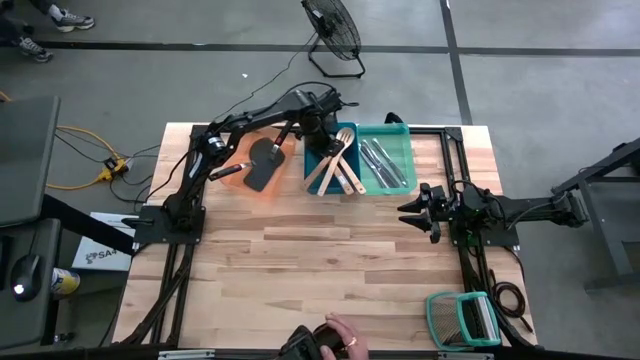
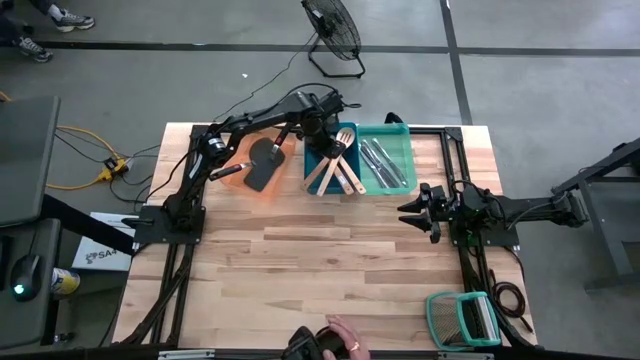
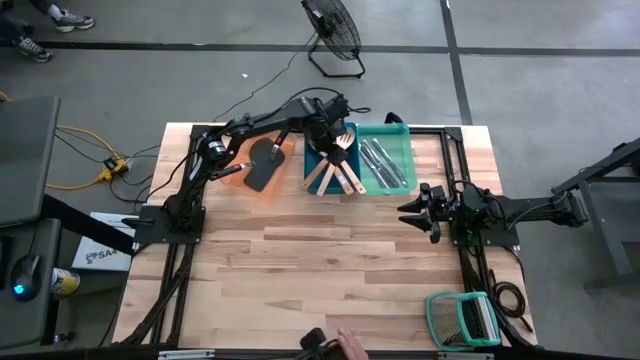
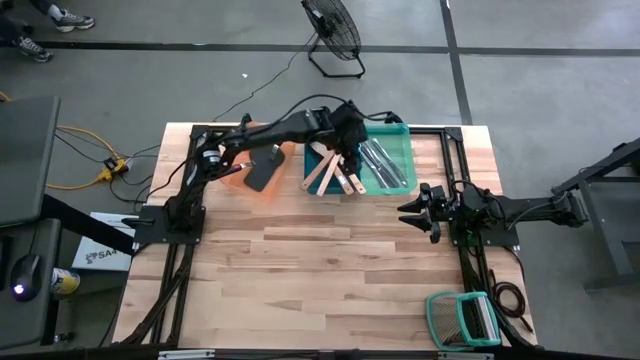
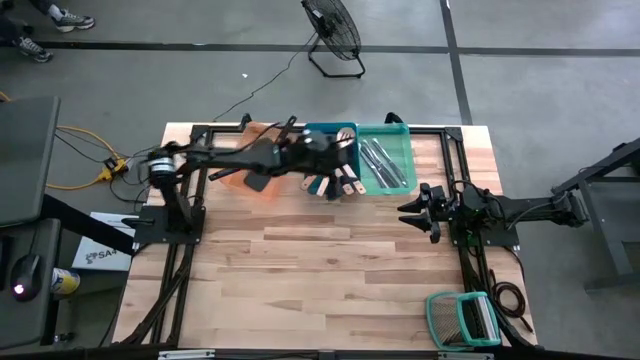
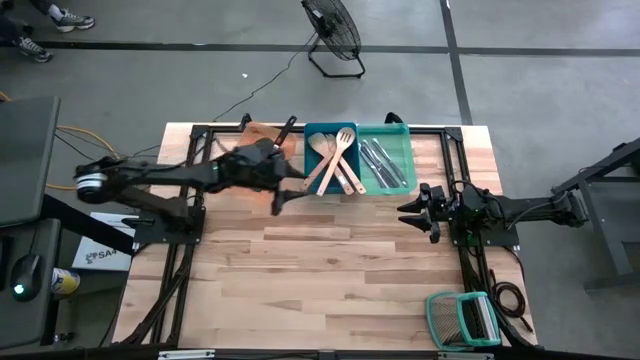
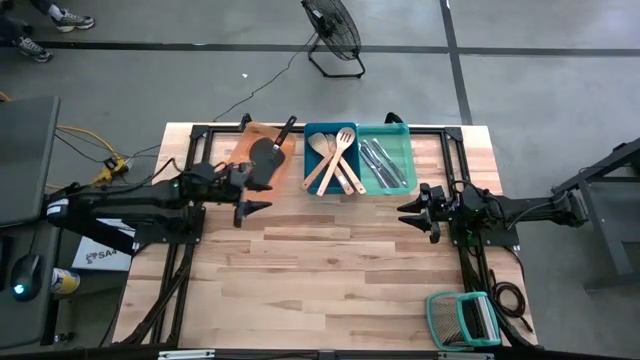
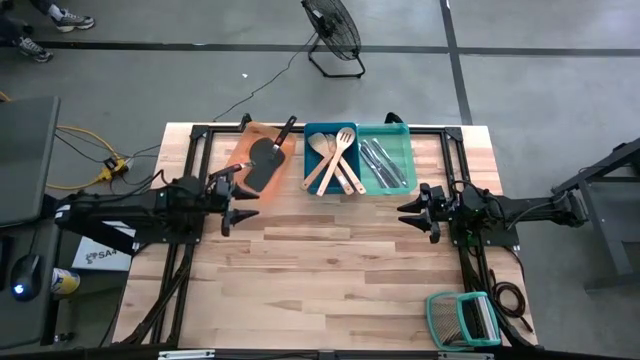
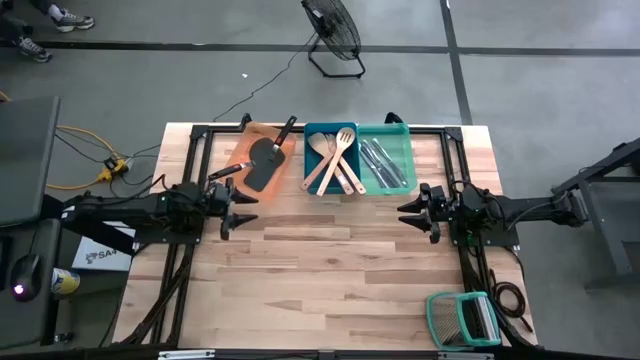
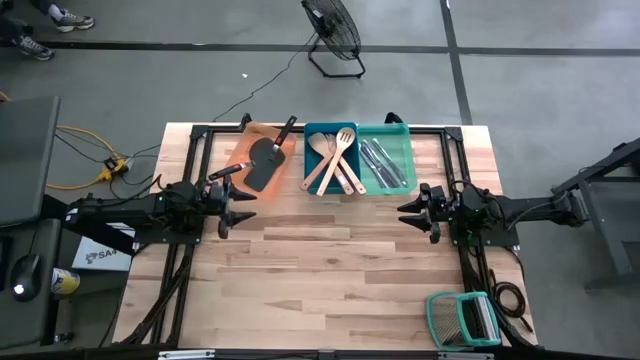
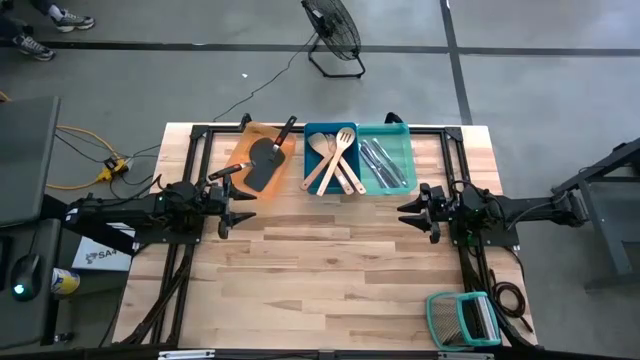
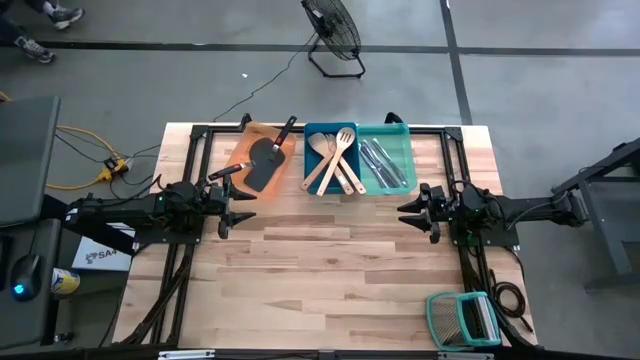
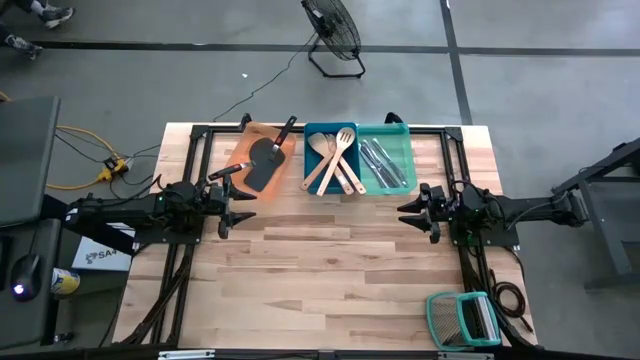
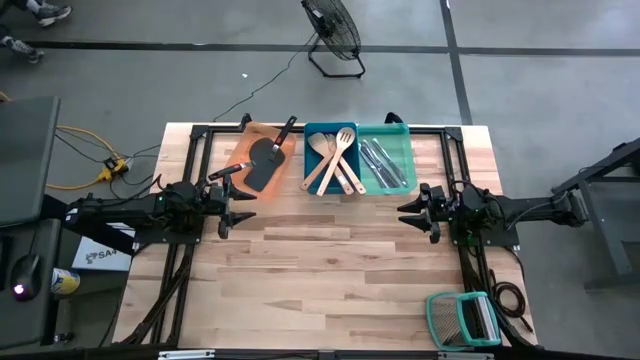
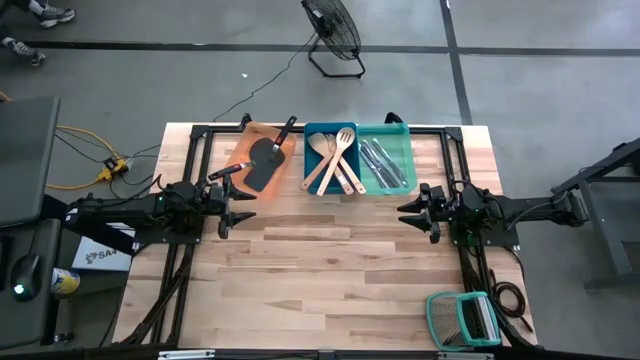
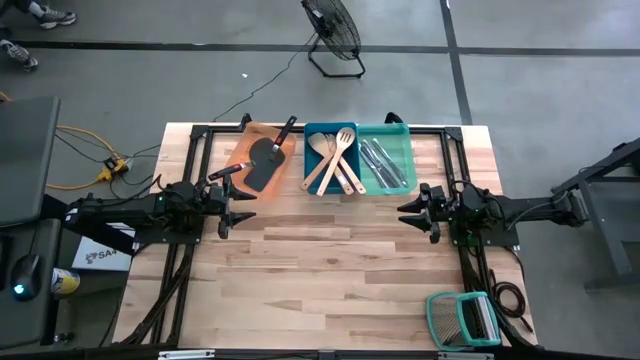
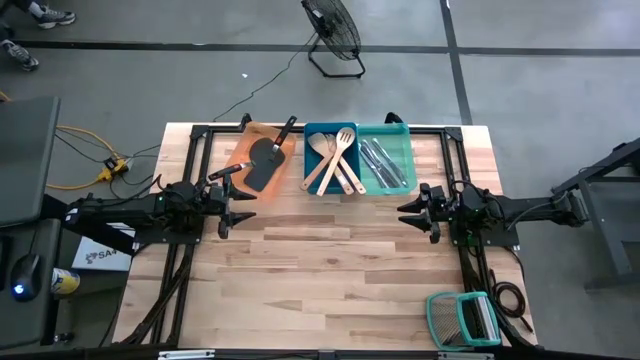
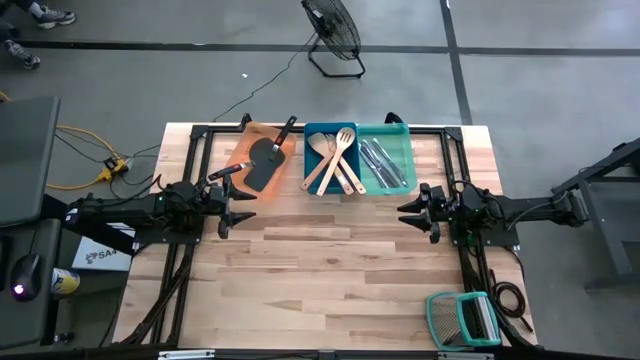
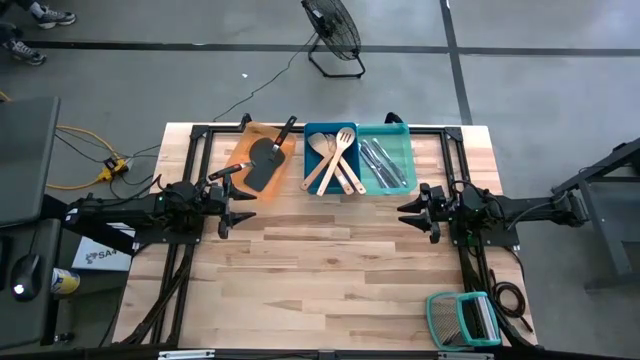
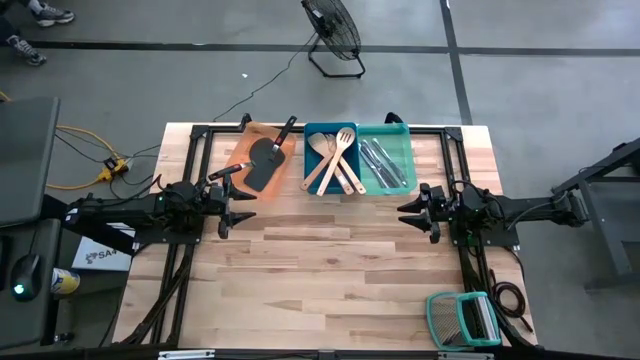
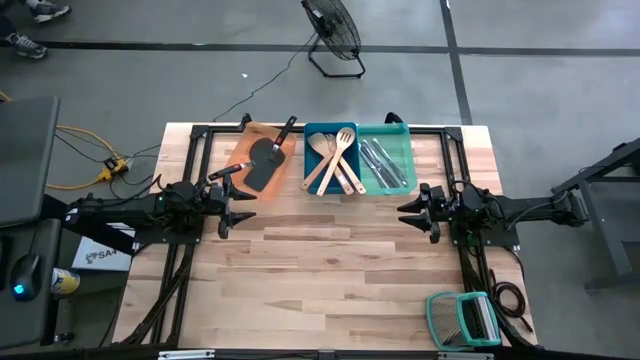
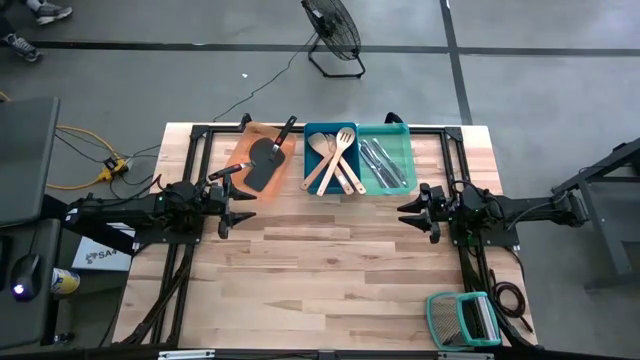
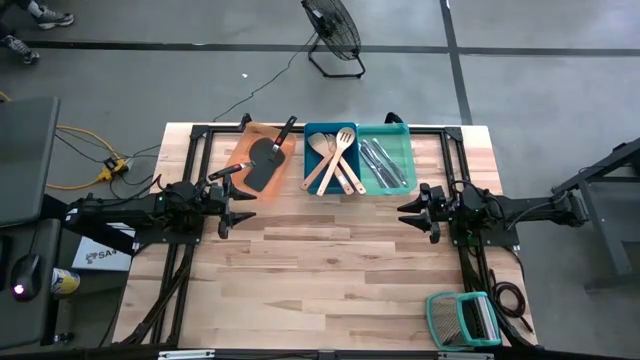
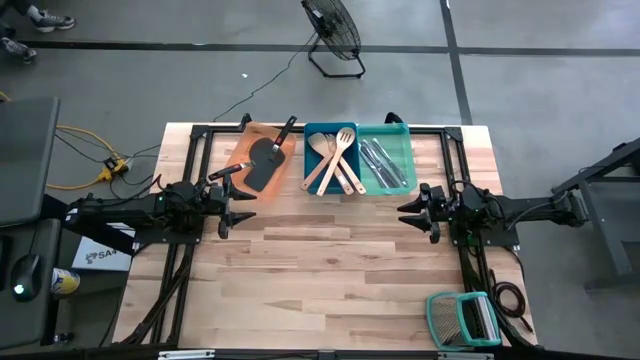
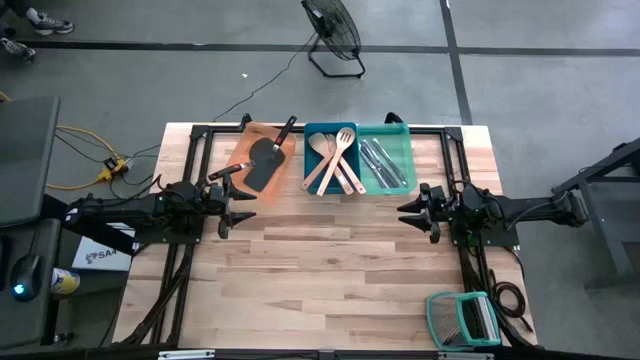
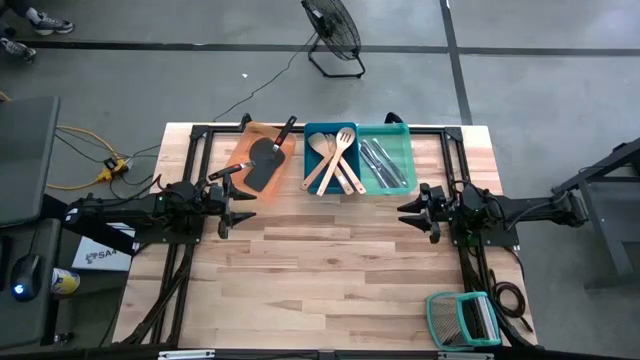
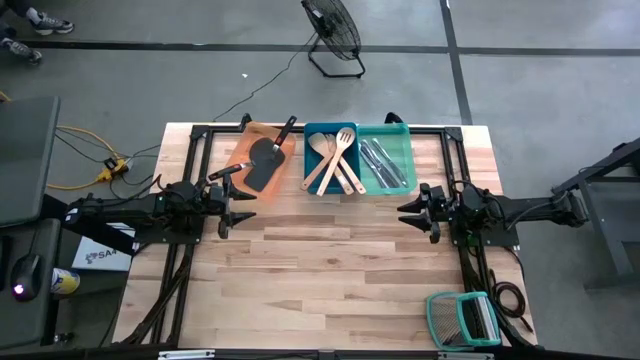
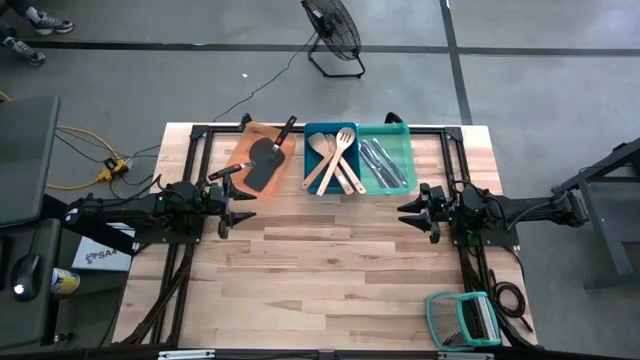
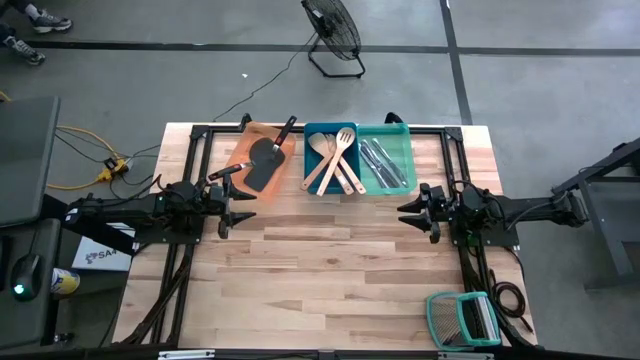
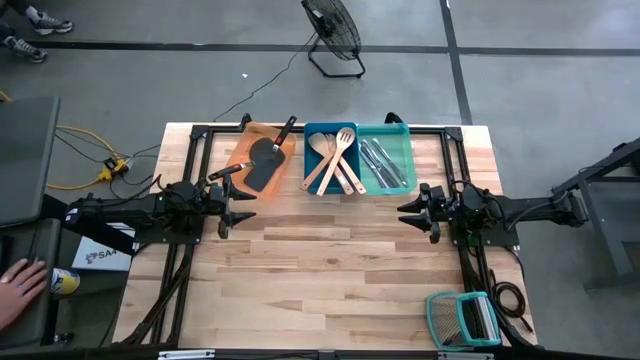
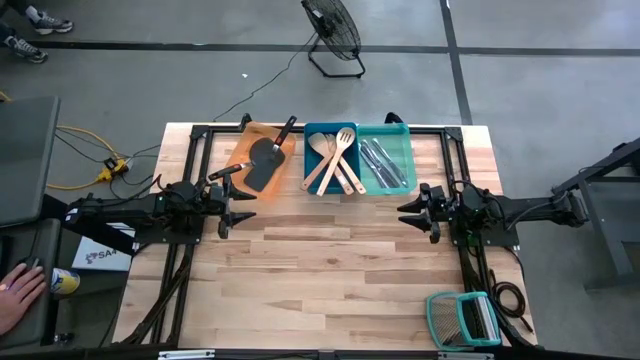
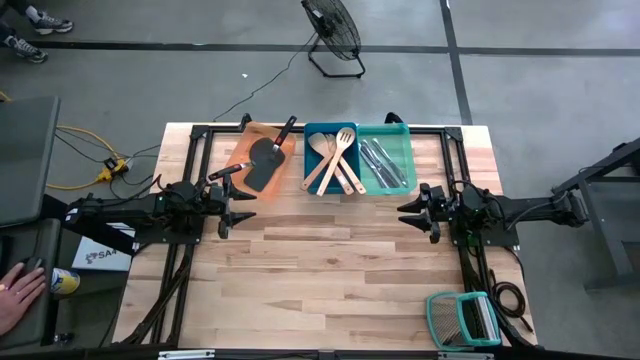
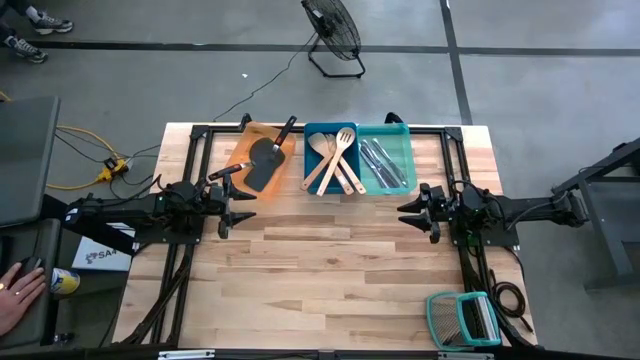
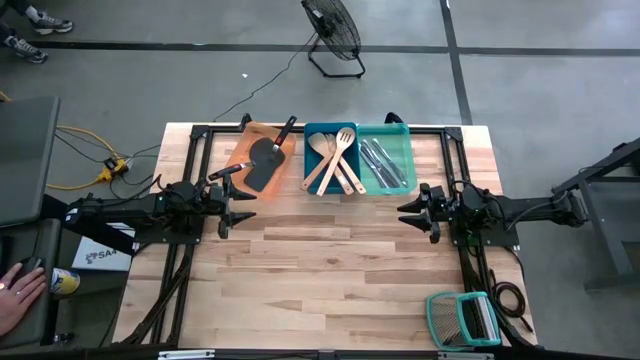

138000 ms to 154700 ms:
Task: Pick & Place Kitchen Items
Return to Home Position

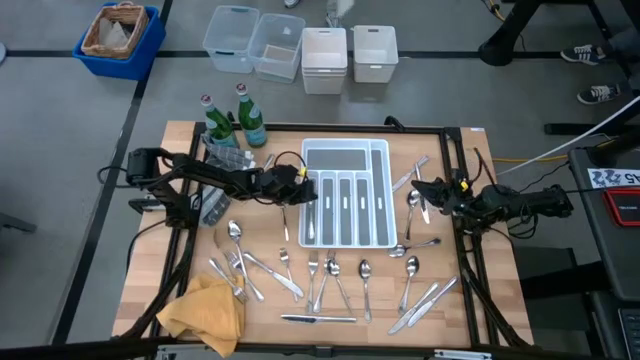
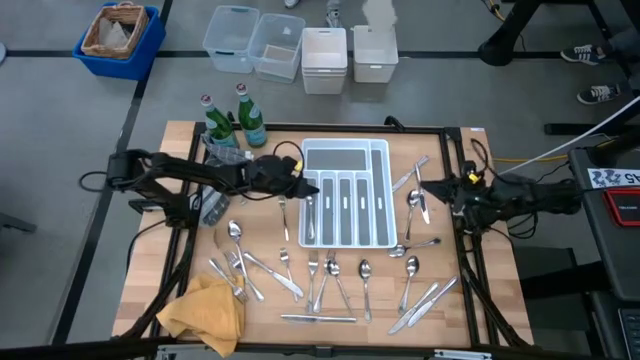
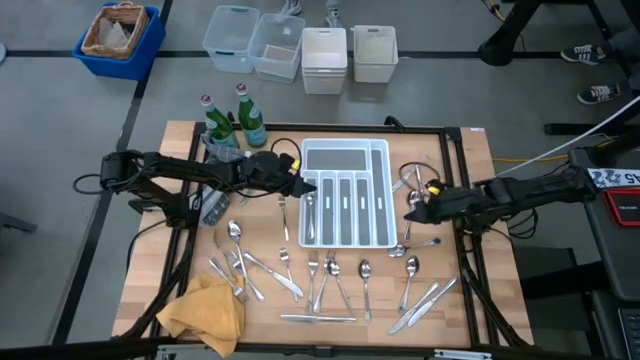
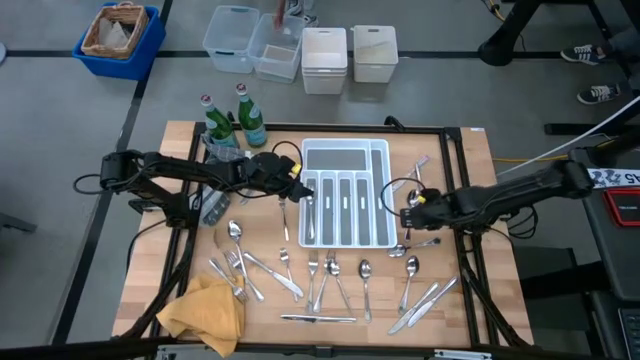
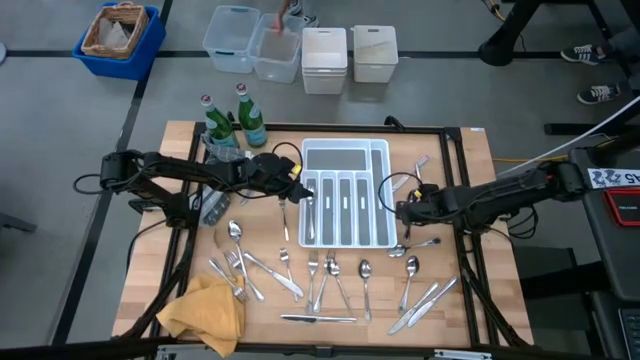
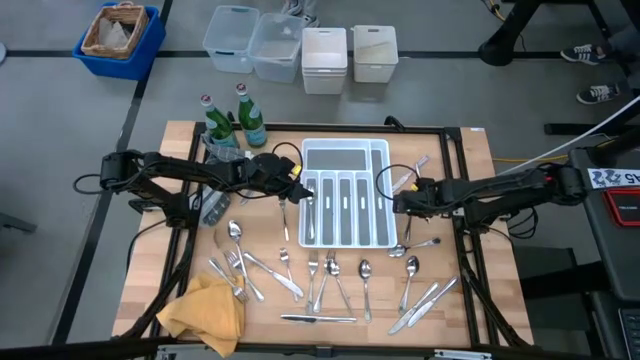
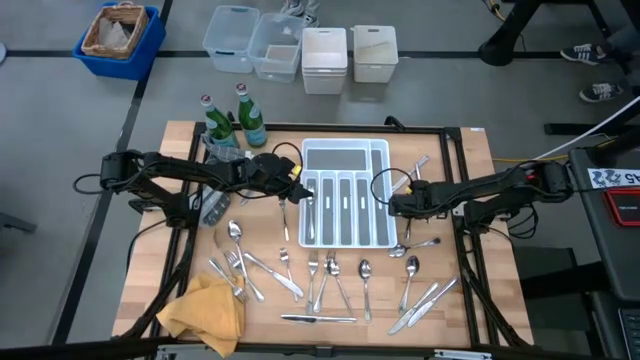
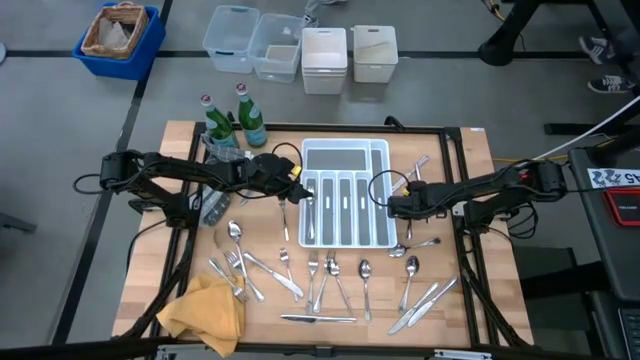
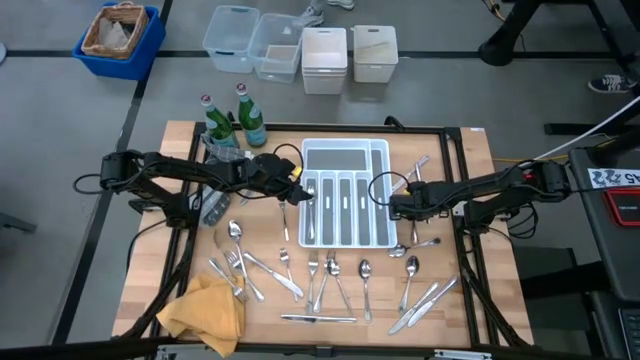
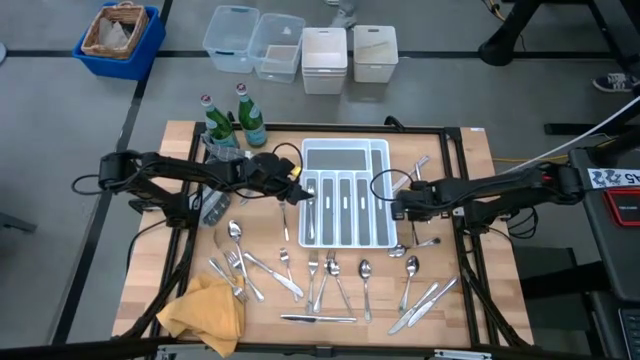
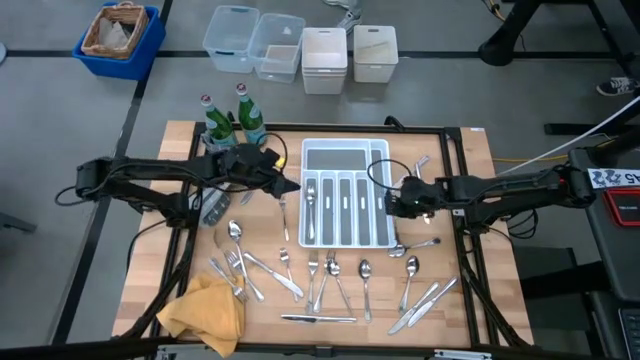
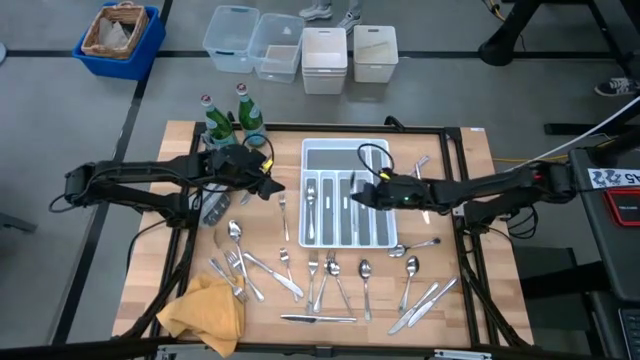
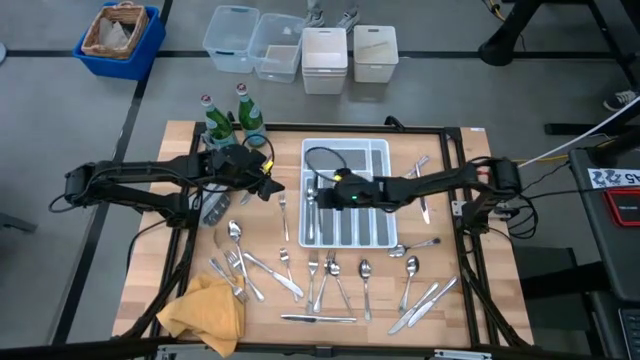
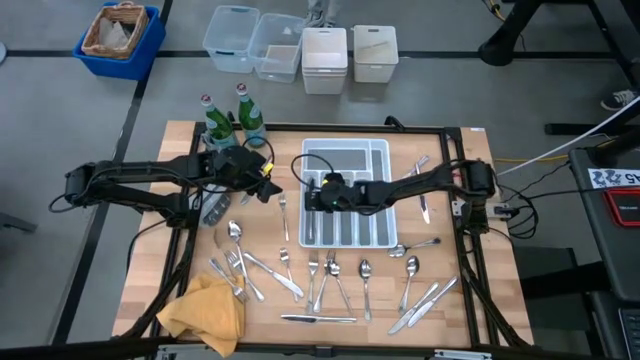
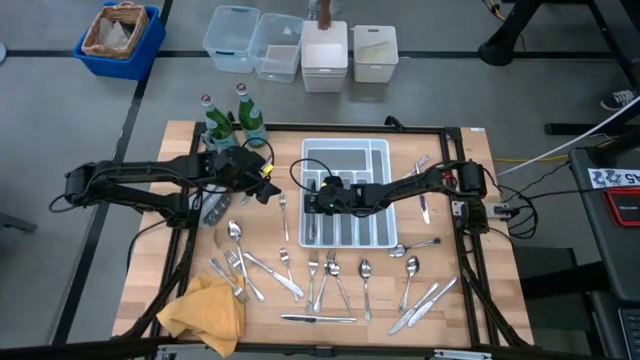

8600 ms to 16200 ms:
Task: Sort silverware
Put the silver spoon into the silverware tray
